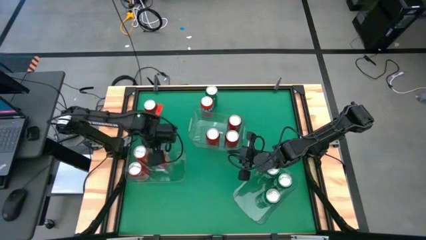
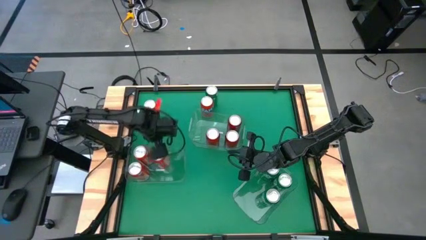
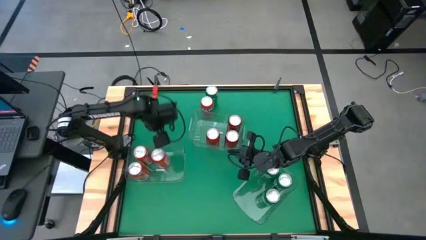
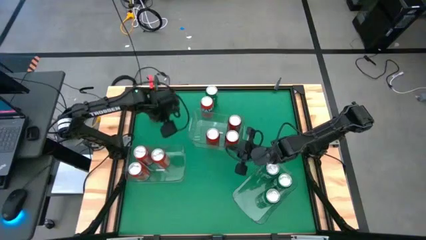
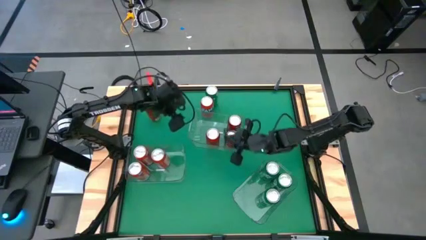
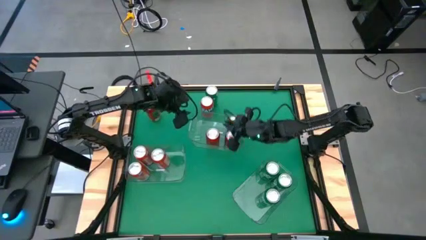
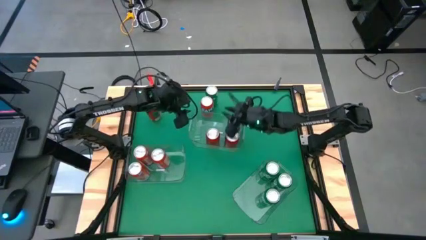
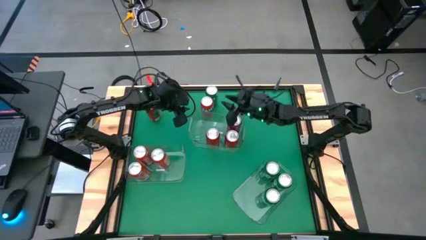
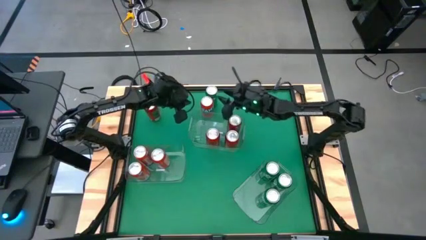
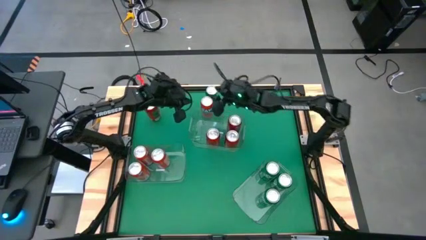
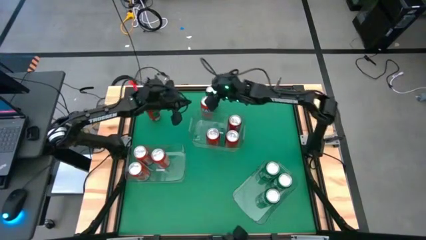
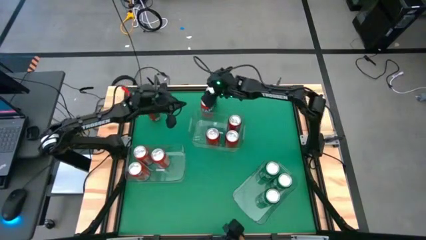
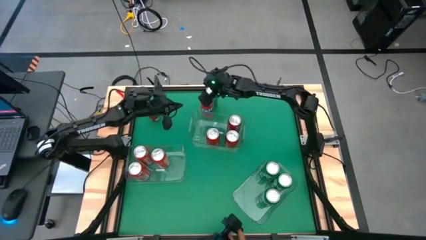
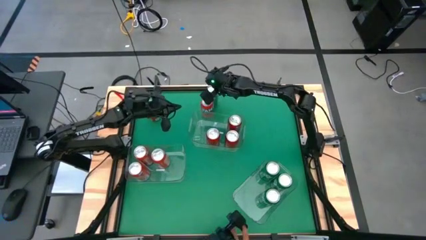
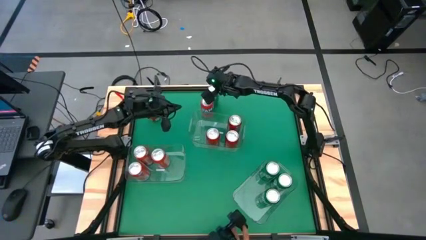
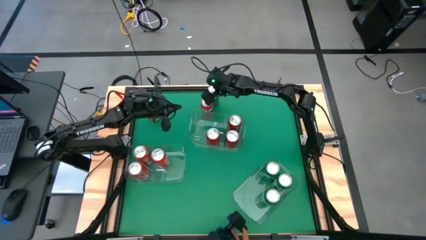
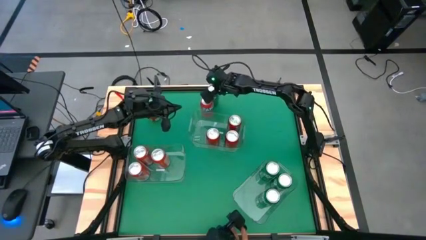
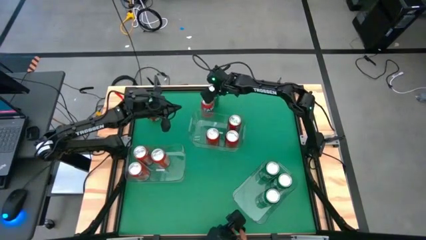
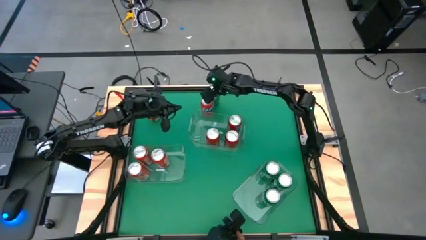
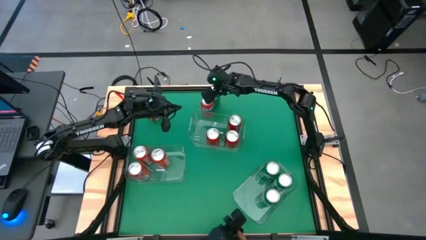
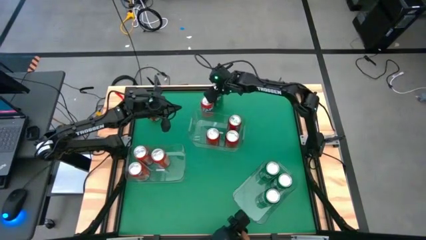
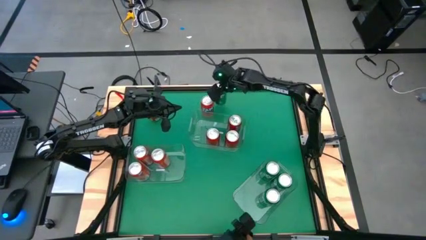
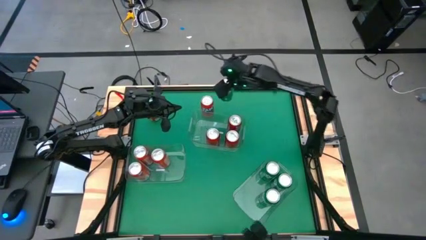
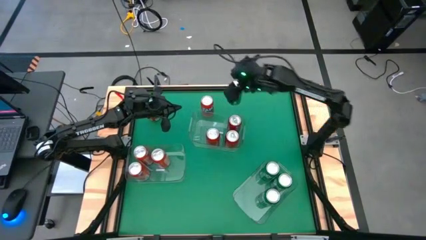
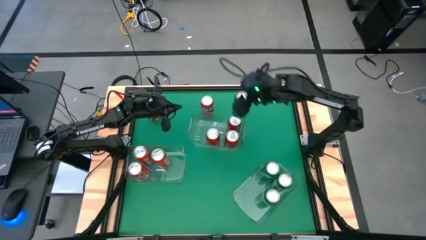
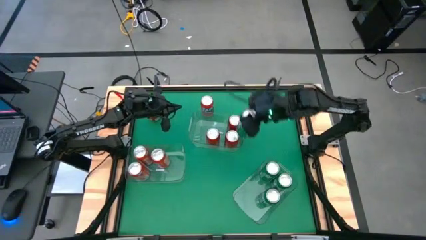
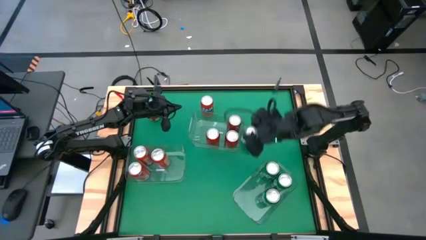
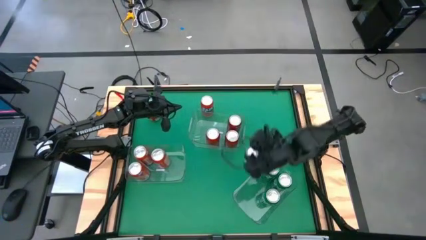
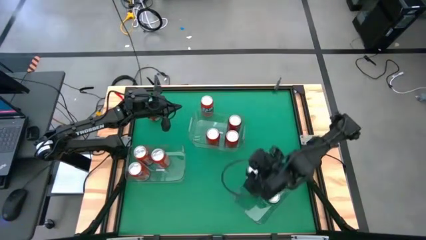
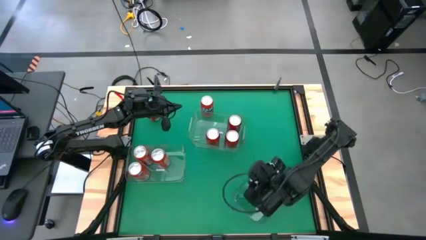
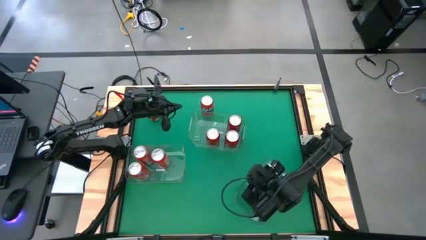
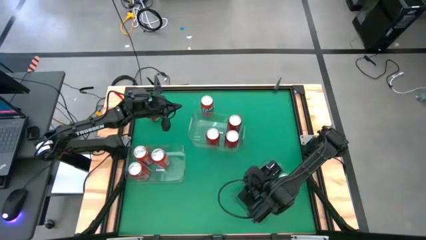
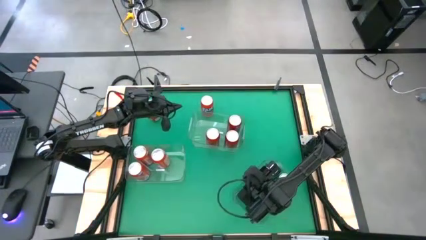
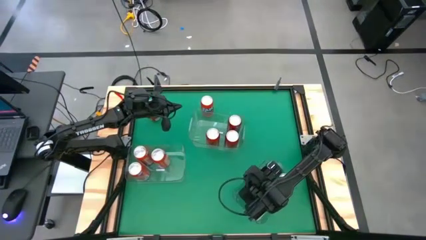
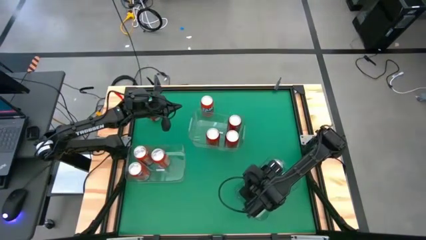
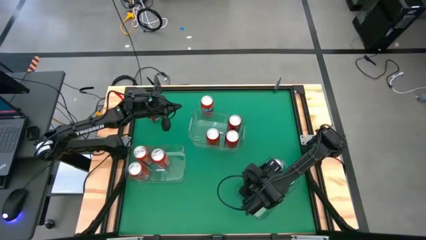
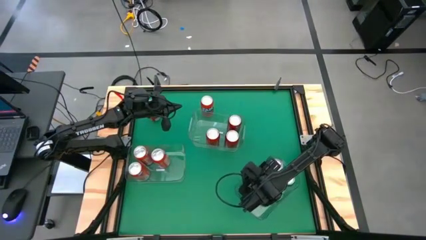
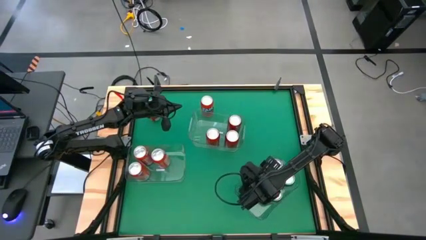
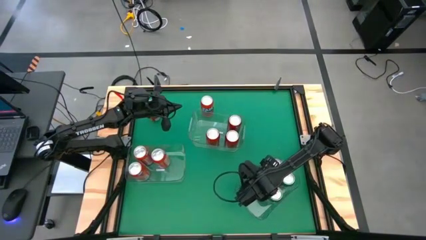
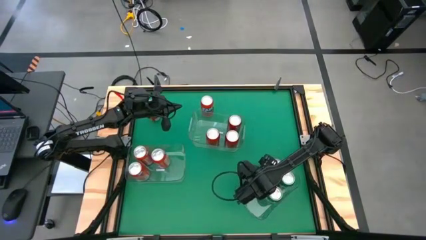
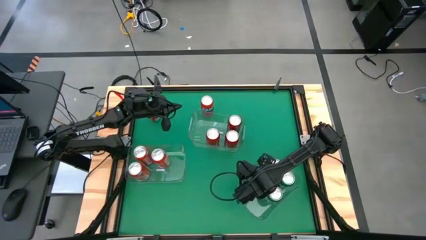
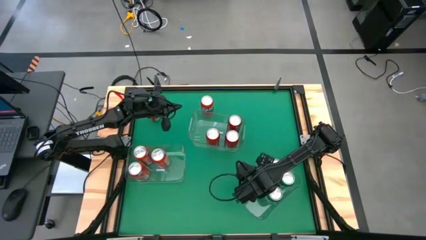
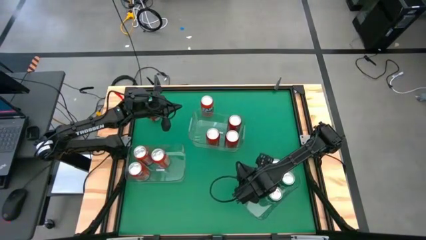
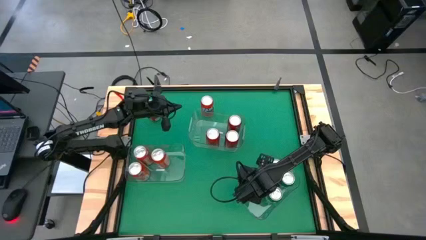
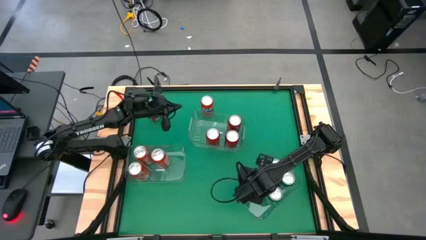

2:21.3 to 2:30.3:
Task: Sort soda cans
Put the green soda can into the bottom right transparent bin

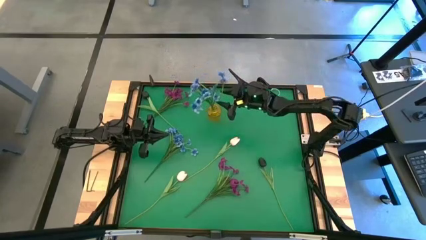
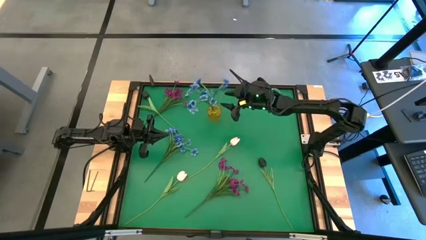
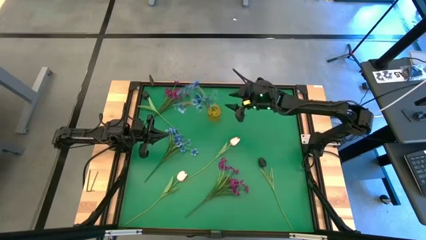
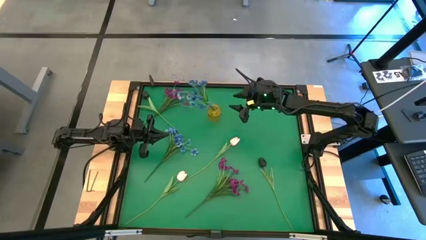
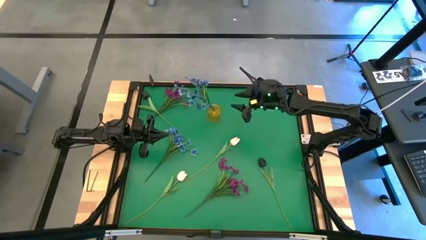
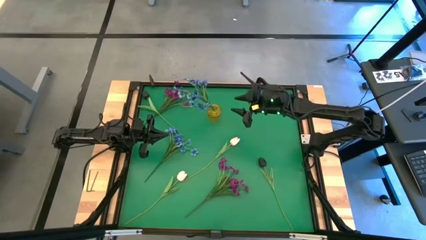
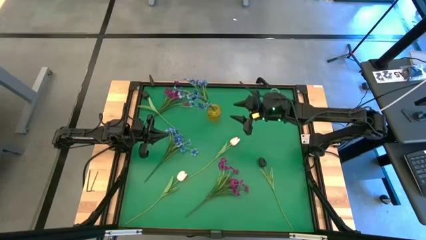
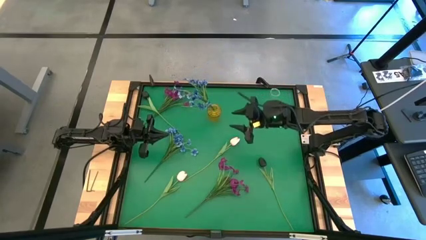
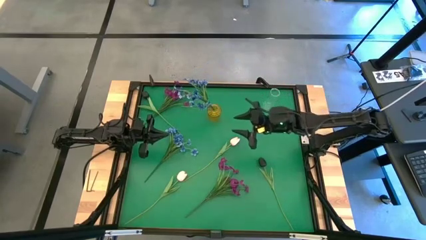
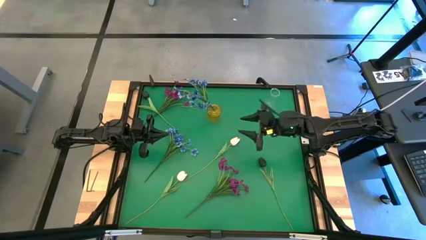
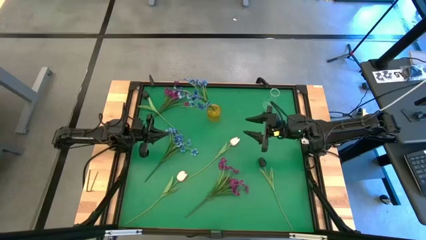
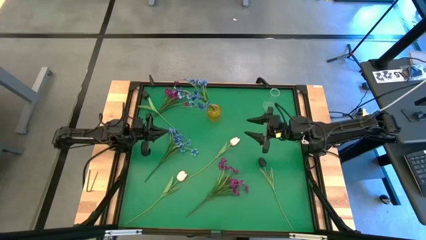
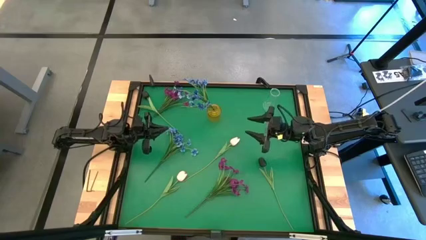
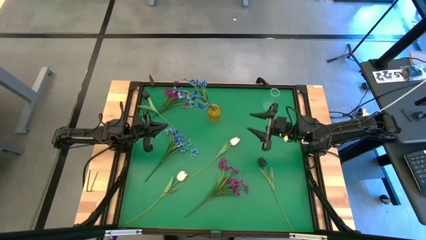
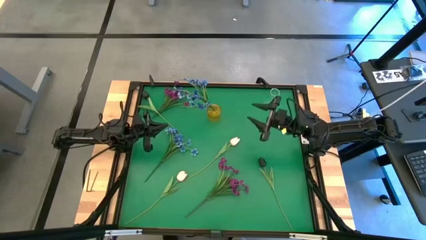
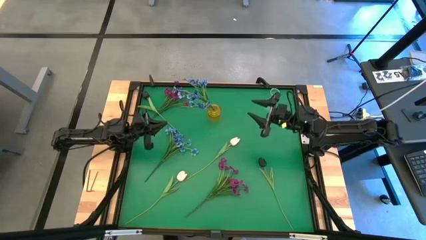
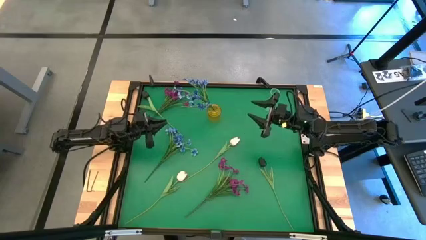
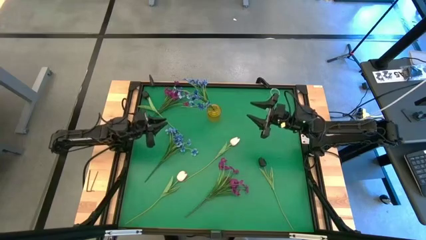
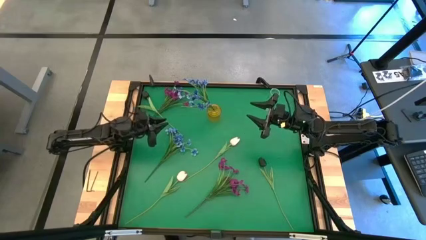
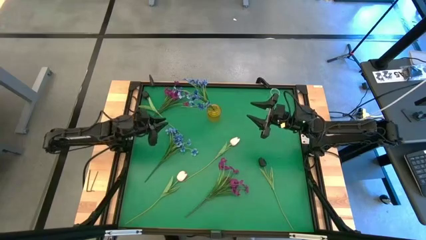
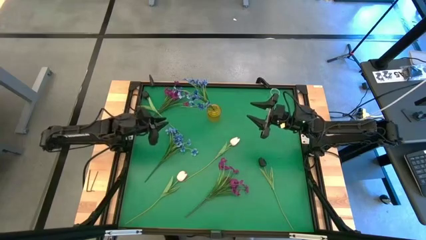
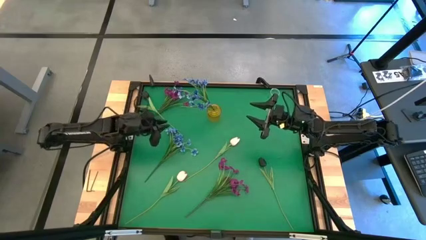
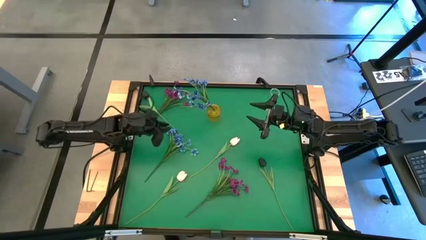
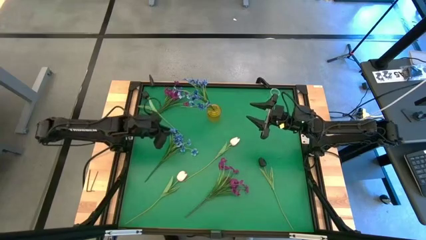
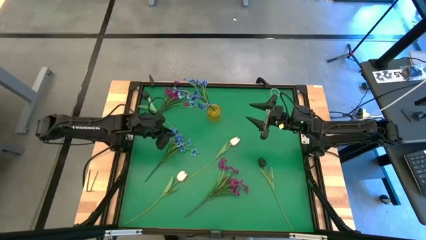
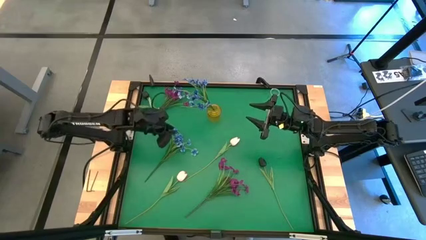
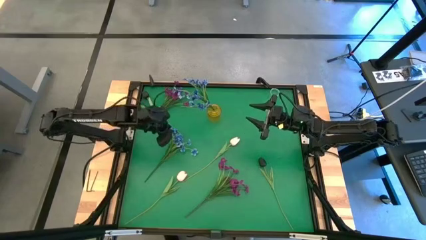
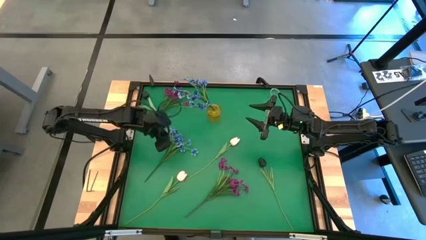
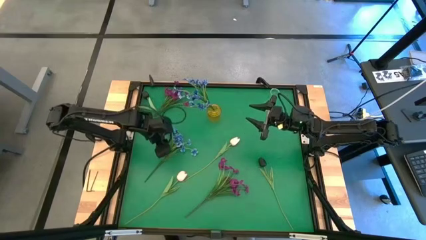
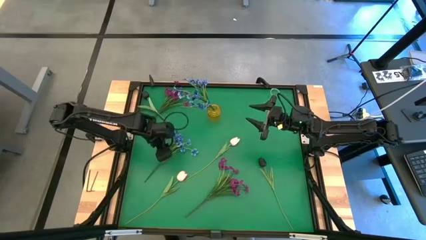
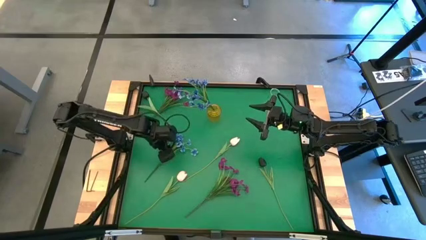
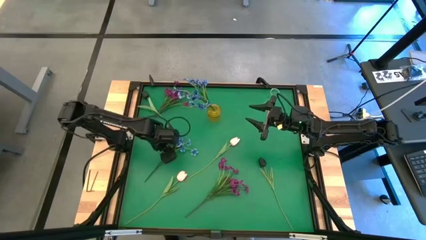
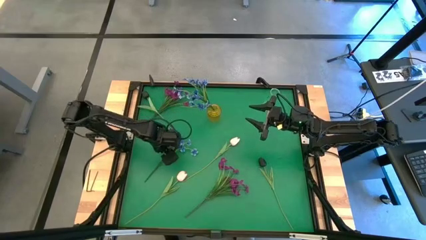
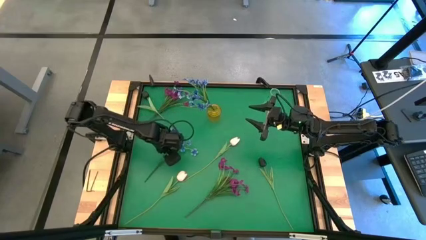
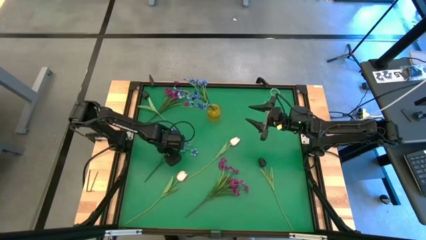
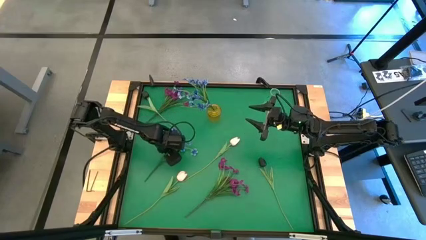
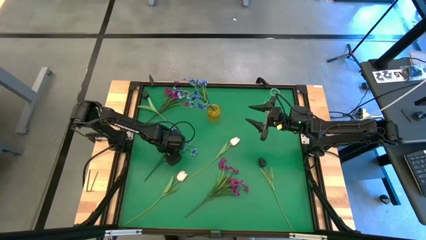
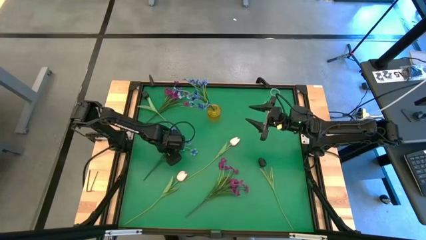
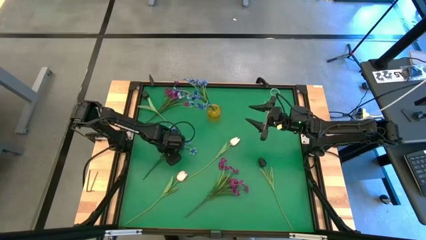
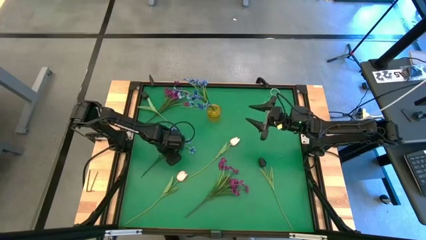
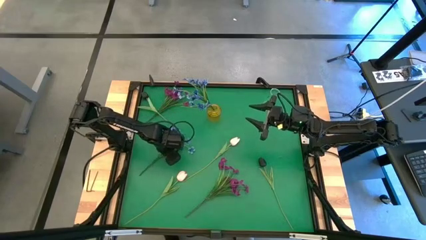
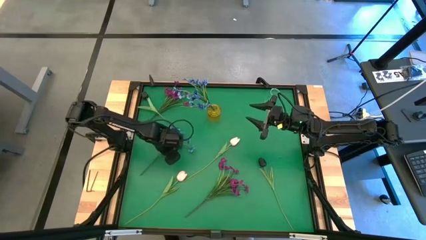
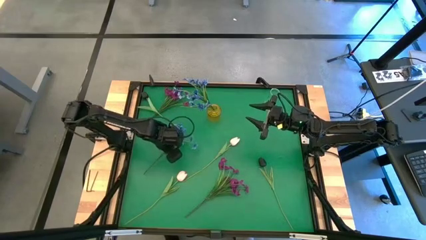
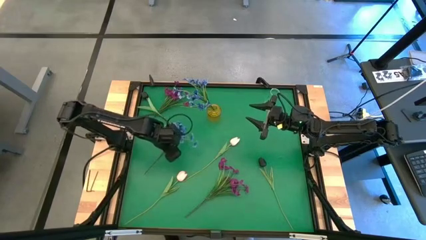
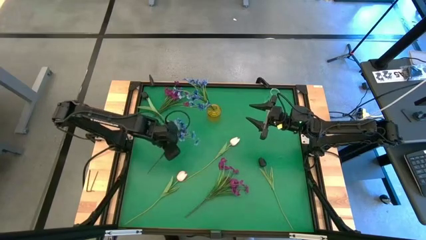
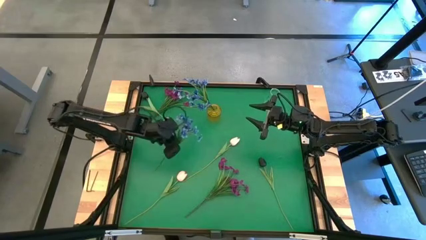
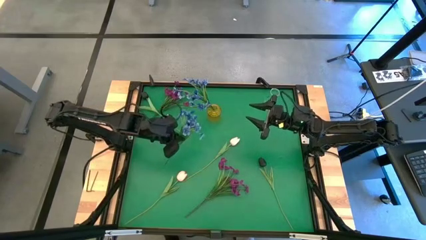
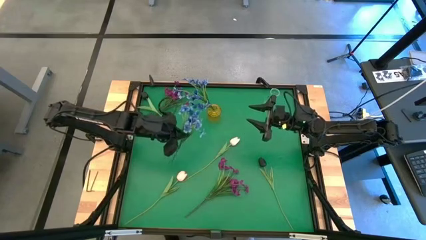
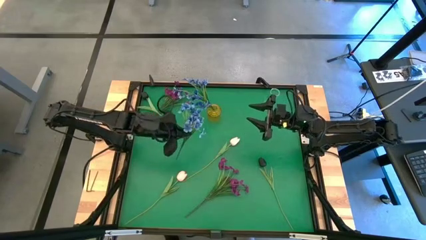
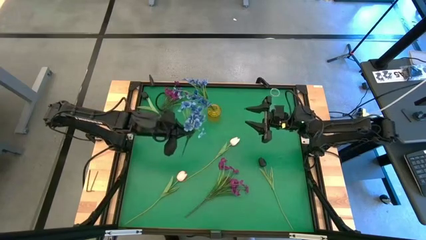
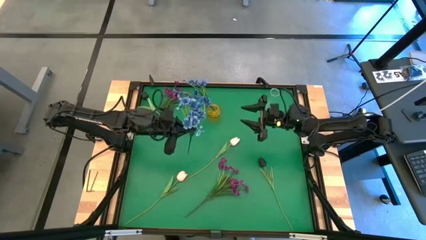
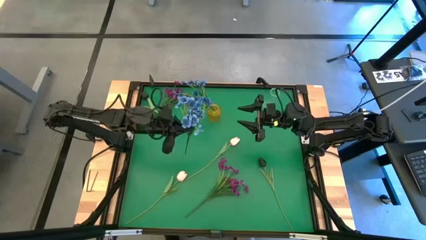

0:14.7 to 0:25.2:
Task: Sort flowers into vase by color
Put the blue flowers into the yellow vase
